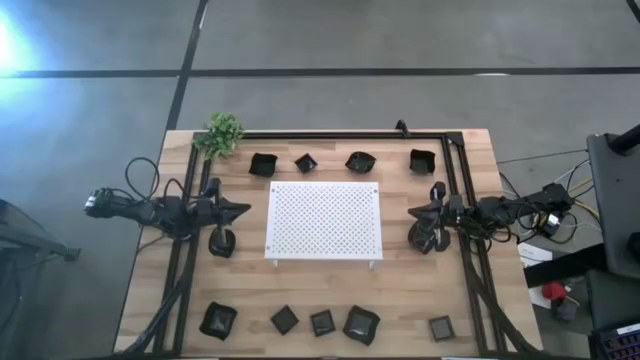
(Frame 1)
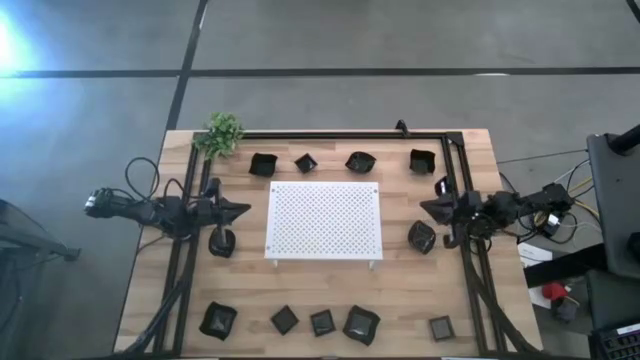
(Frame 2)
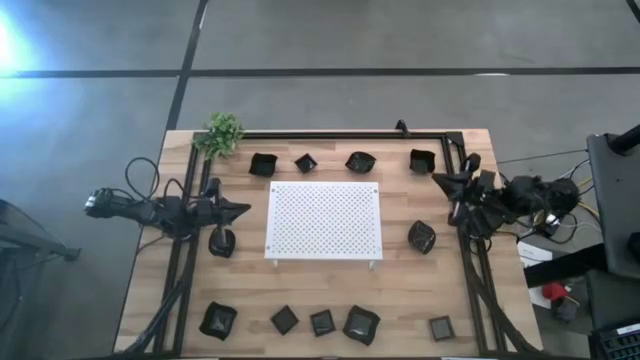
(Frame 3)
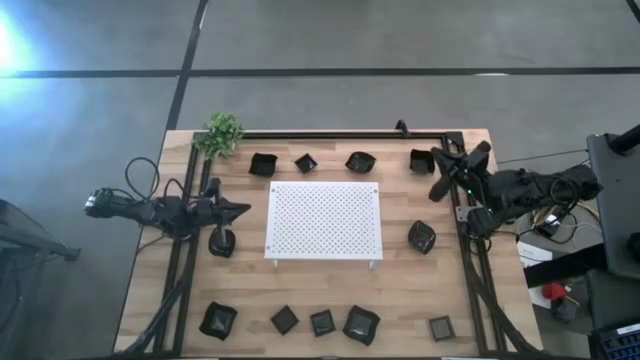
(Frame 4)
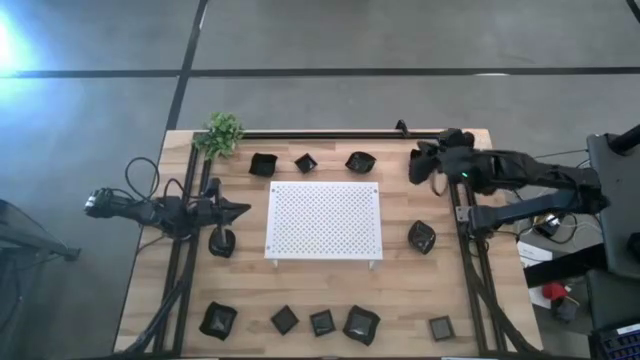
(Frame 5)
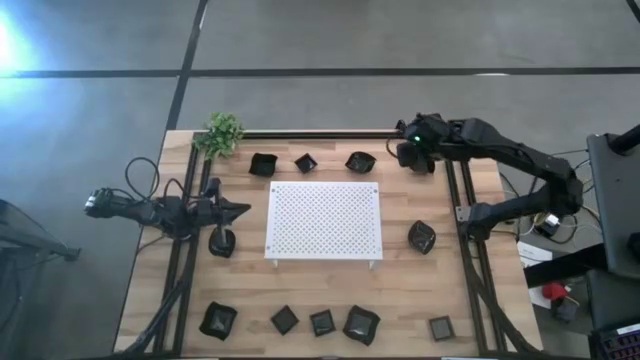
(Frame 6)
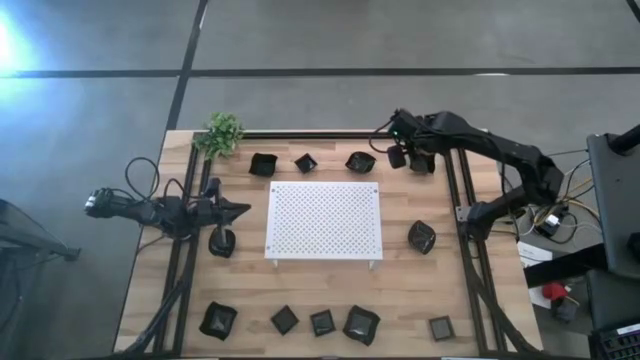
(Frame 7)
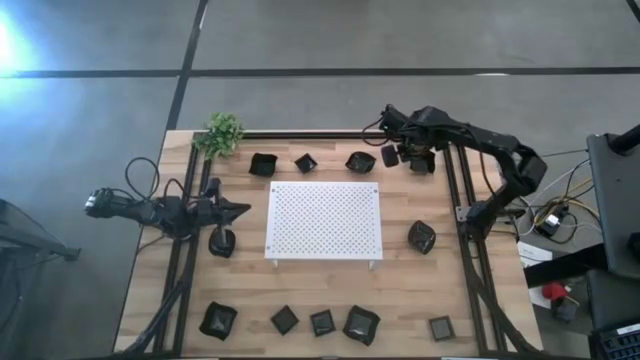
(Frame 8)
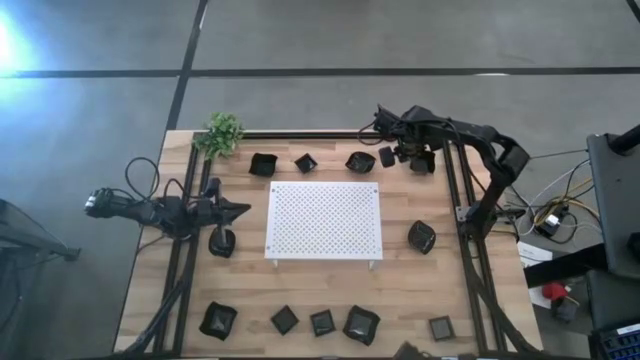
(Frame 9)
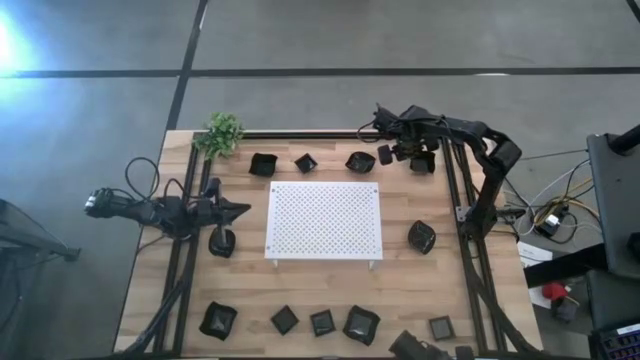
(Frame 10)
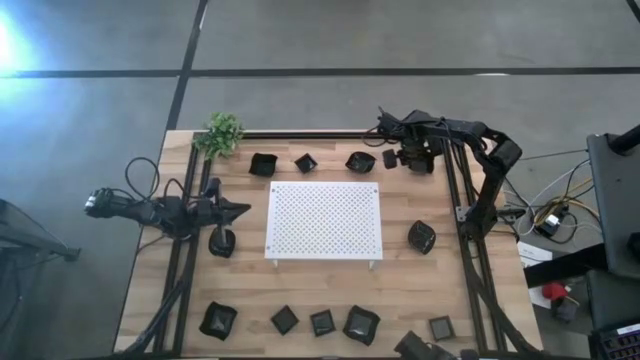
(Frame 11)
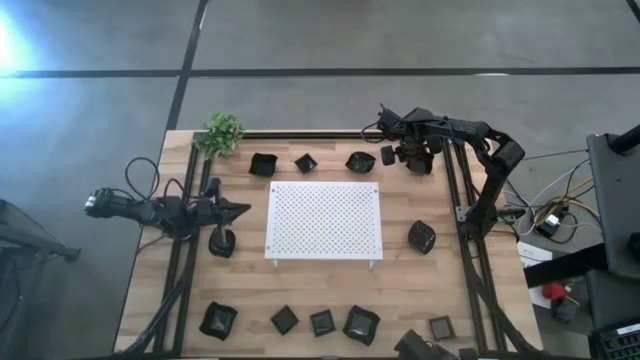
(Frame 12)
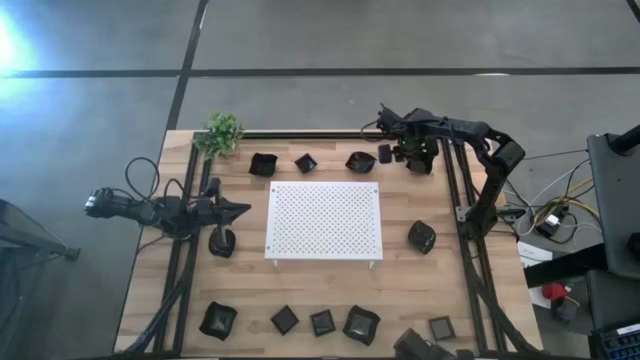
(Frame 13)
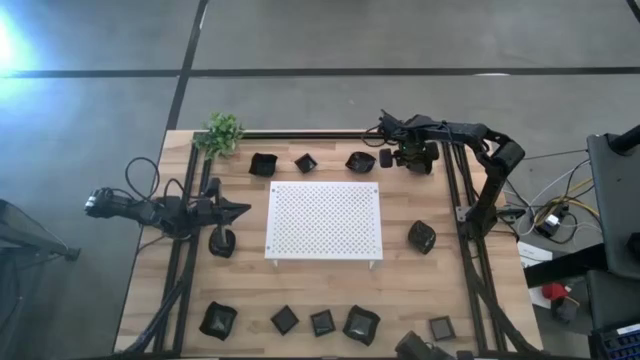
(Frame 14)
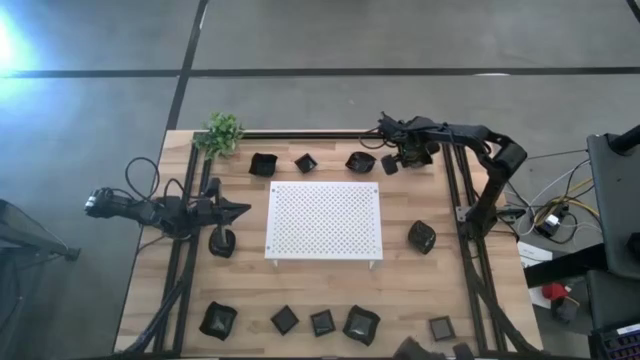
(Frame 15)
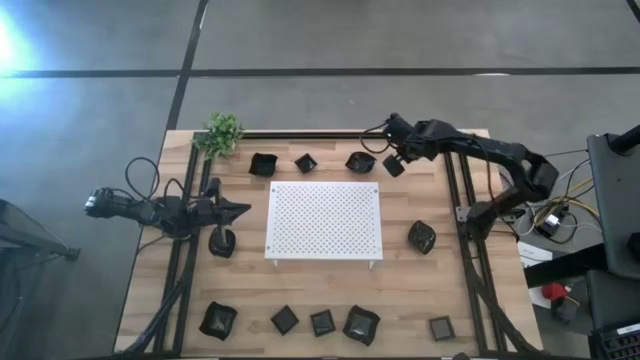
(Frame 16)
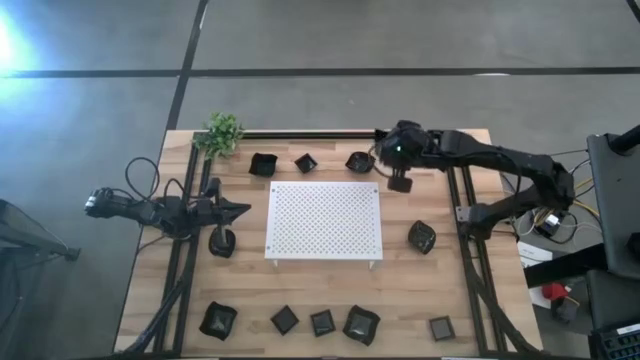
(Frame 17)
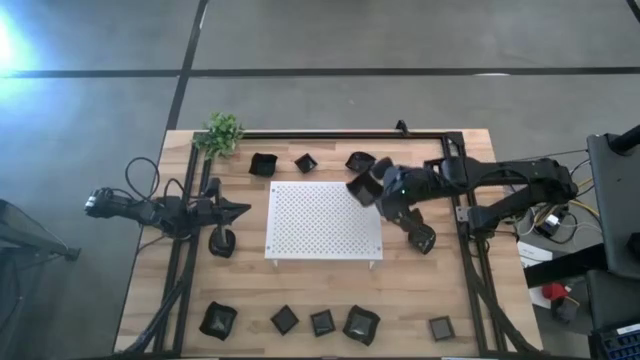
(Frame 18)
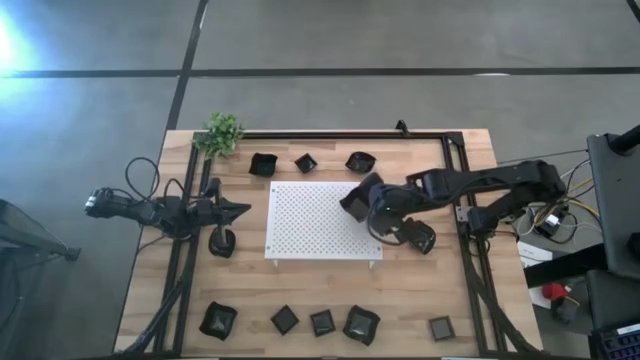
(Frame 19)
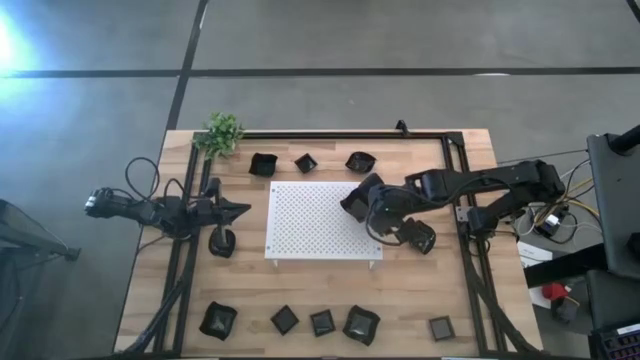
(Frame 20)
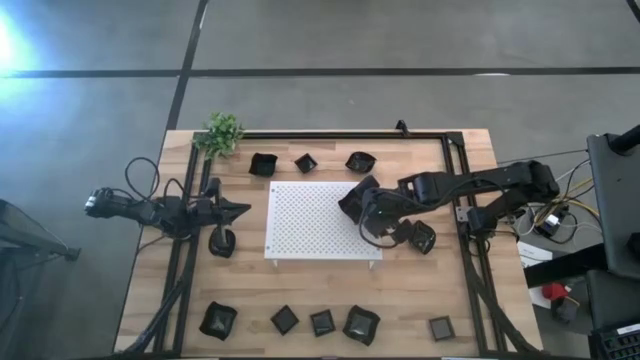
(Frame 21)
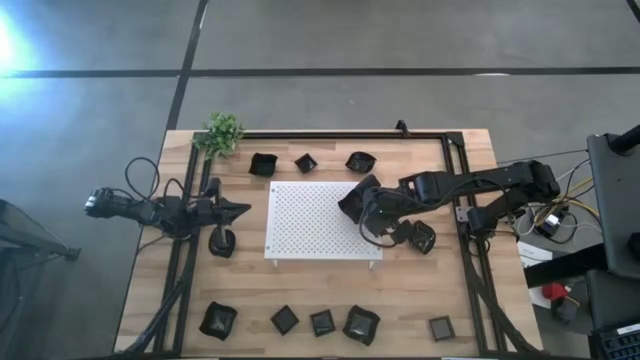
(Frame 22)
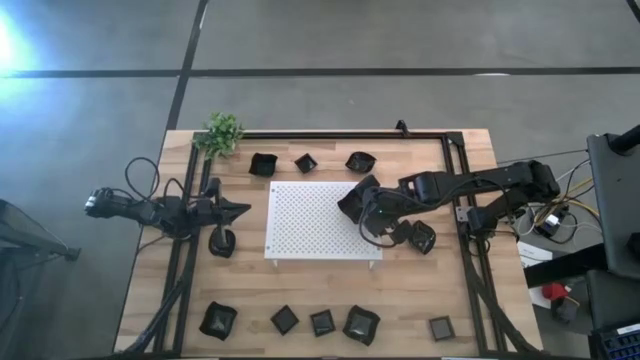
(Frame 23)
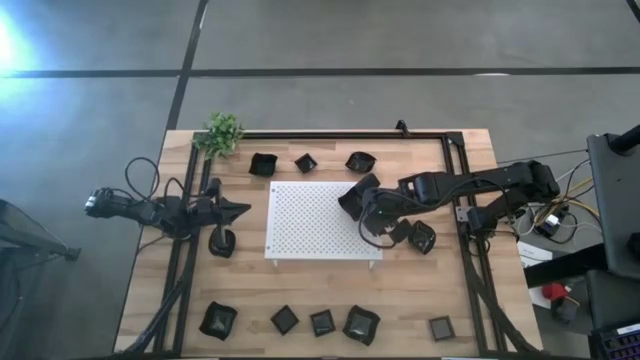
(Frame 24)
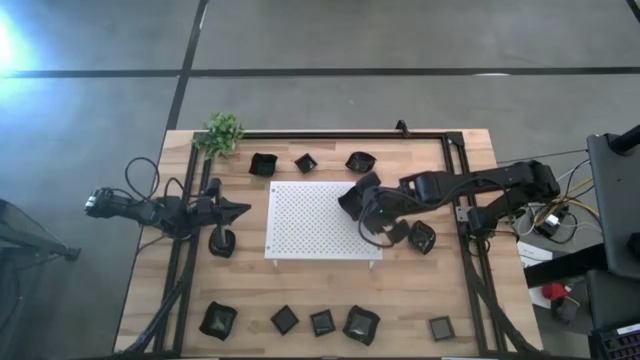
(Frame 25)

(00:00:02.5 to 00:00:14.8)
Task: Pick & Place Mini shaped plates
Put the black distorted square plate on the shelf

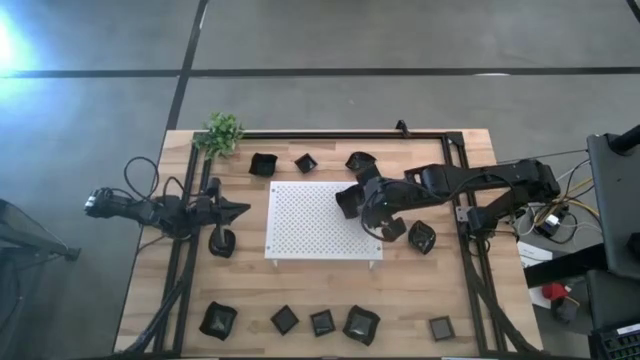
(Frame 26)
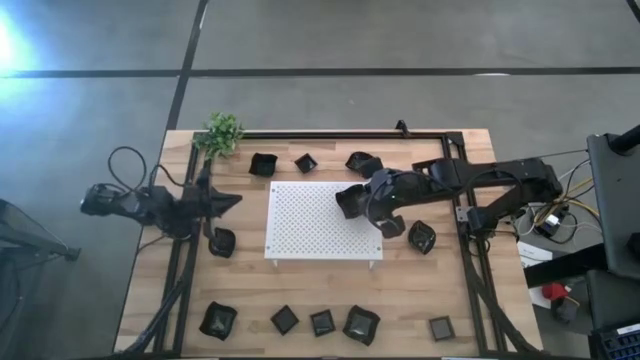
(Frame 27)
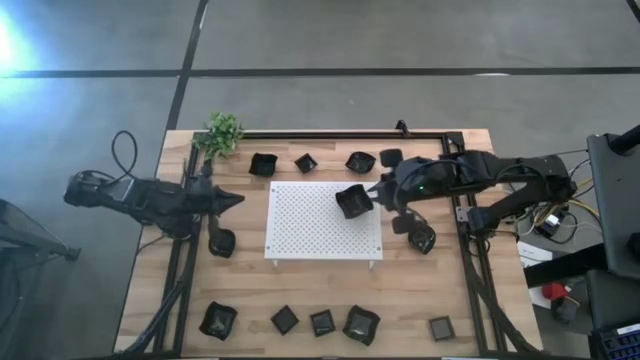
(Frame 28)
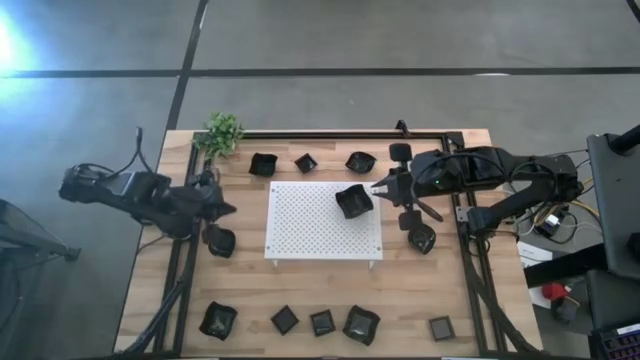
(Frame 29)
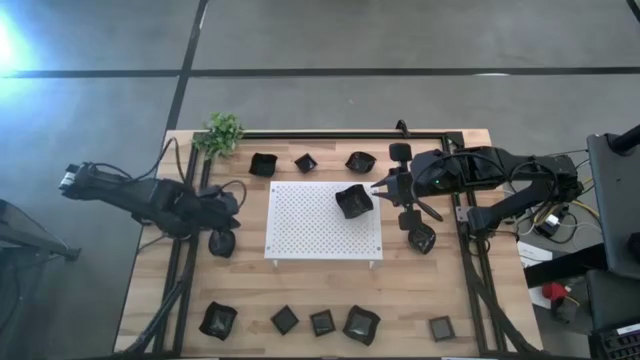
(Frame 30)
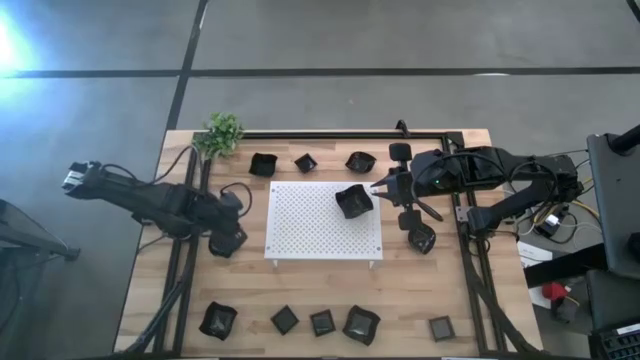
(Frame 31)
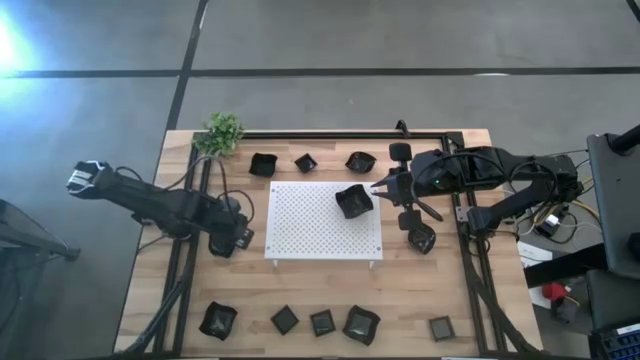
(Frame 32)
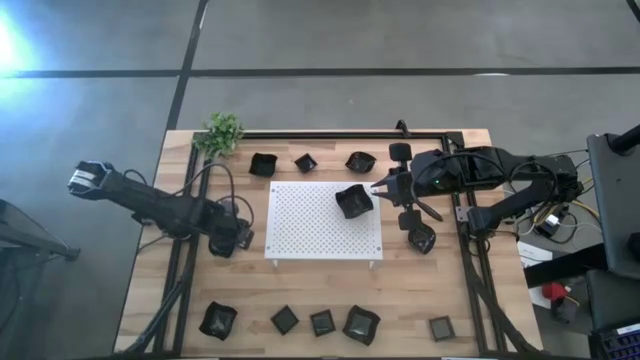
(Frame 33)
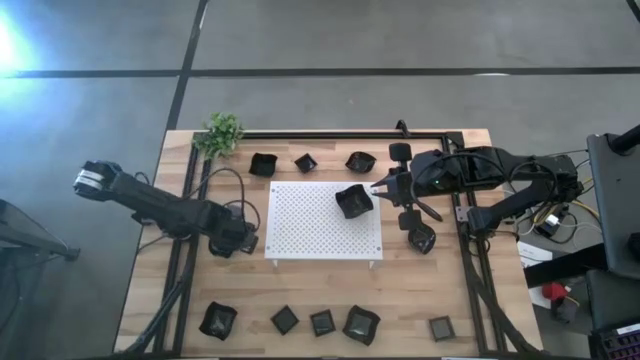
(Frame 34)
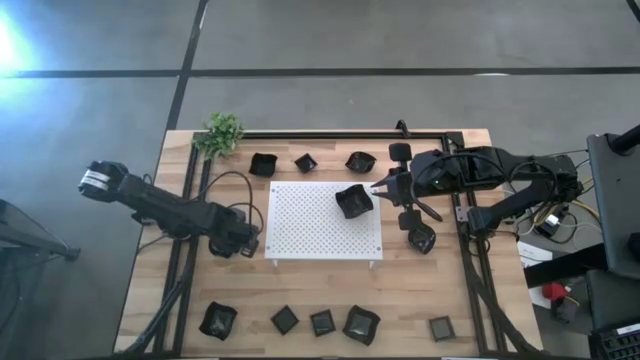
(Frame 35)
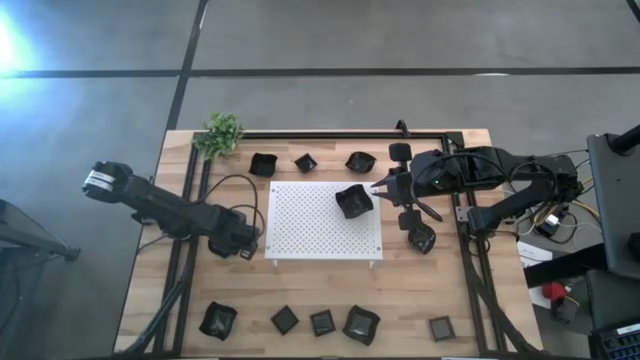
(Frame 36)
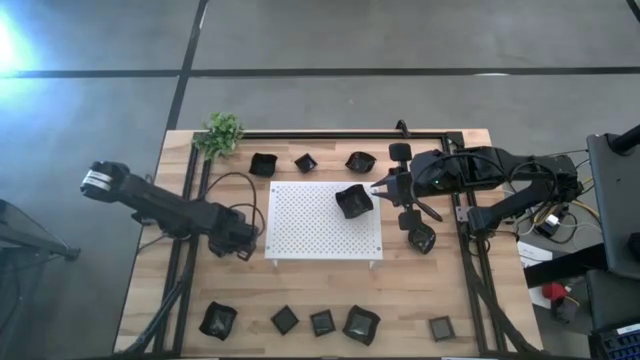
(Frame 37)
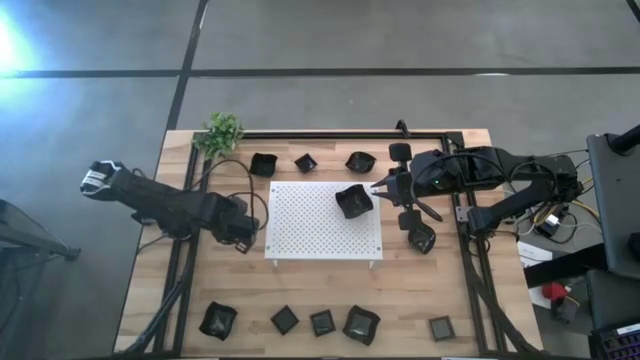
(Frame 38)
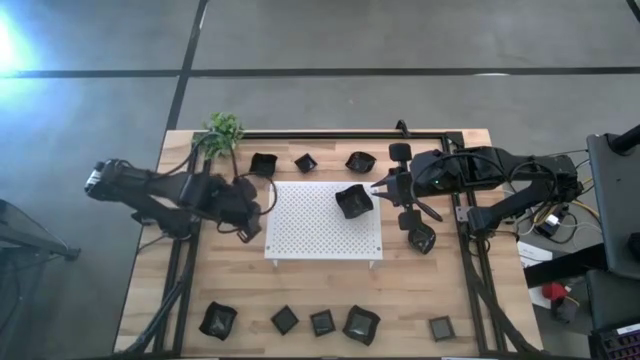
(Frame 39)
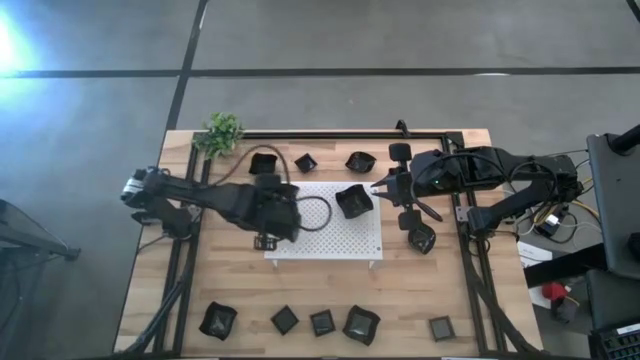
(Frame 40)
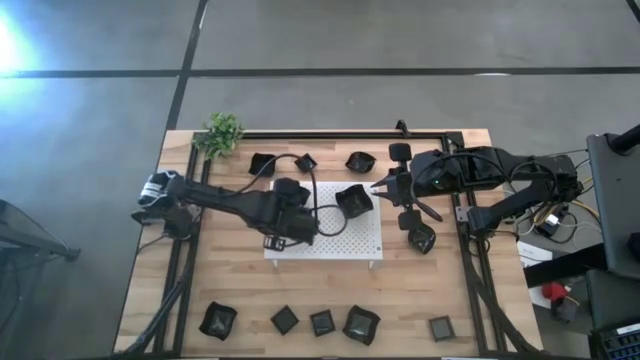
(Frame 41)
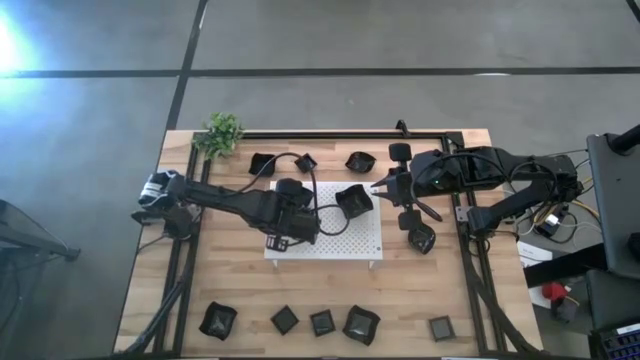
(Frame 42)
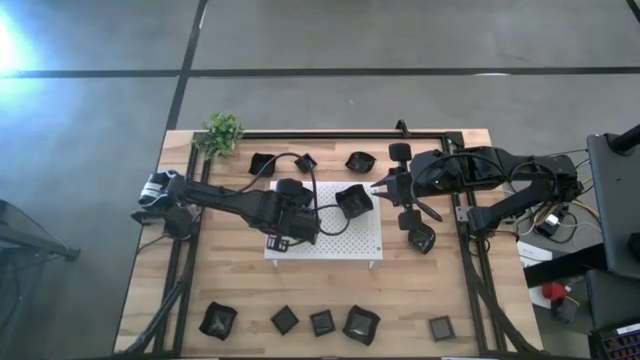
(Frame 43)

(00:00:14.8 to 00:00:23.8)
Put the black leaf shaped plate on the shelf
